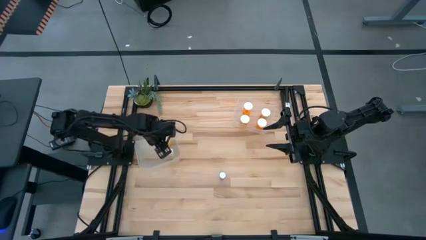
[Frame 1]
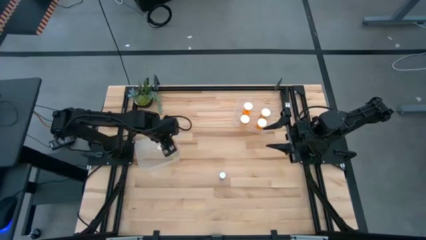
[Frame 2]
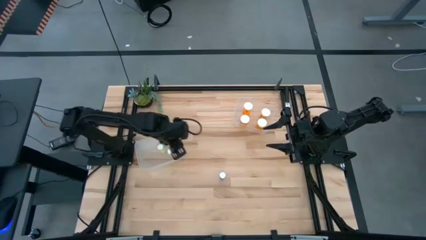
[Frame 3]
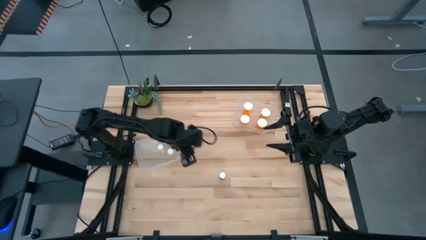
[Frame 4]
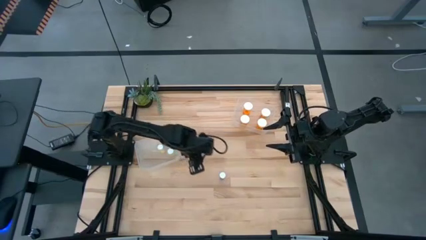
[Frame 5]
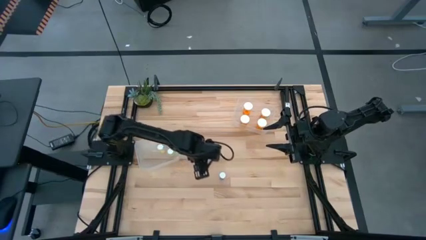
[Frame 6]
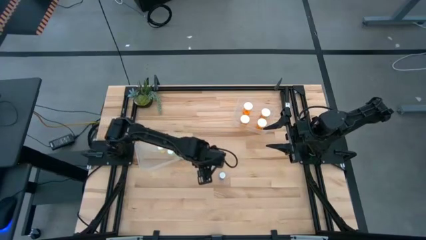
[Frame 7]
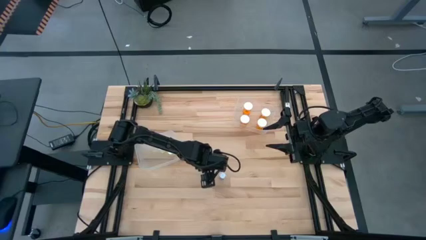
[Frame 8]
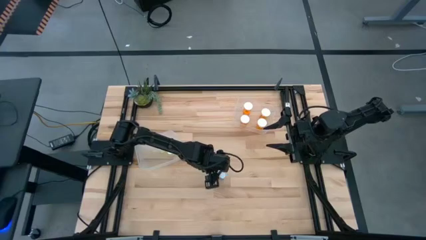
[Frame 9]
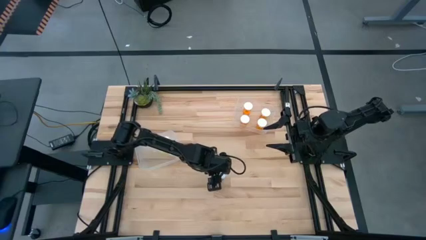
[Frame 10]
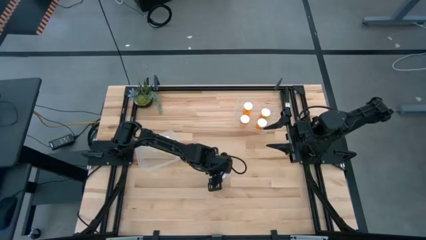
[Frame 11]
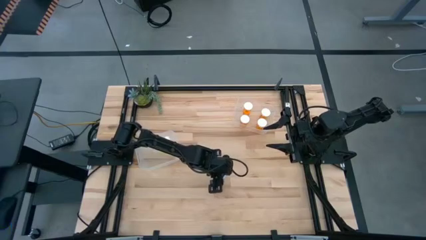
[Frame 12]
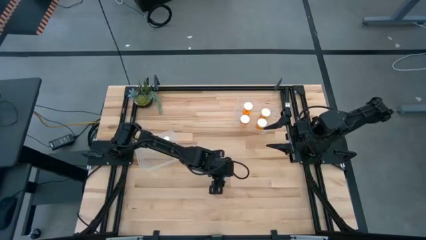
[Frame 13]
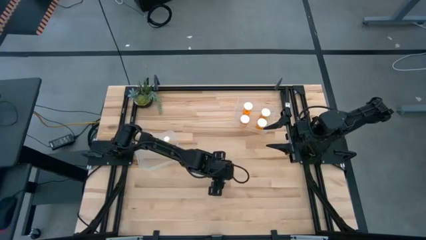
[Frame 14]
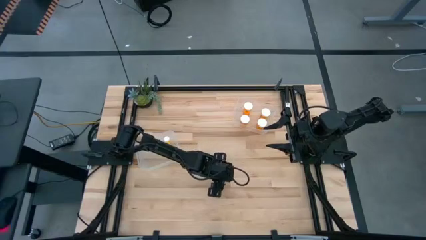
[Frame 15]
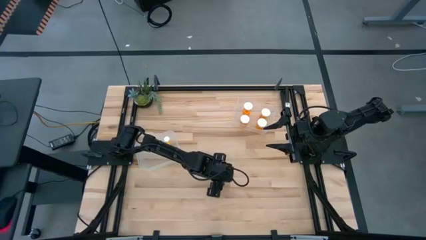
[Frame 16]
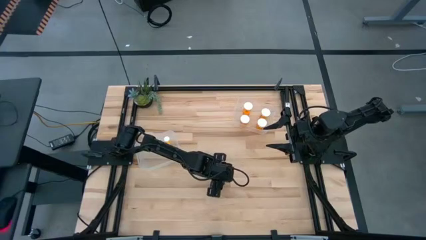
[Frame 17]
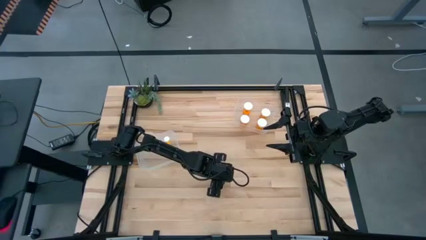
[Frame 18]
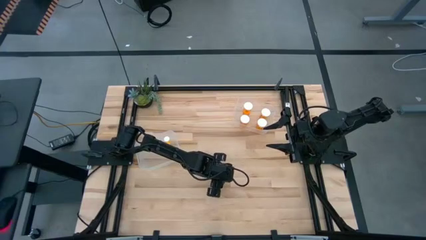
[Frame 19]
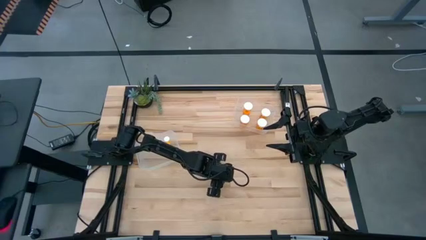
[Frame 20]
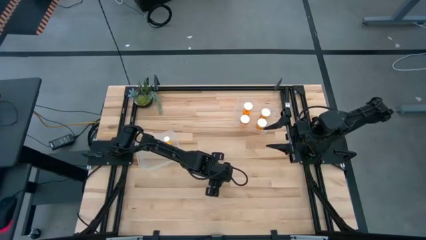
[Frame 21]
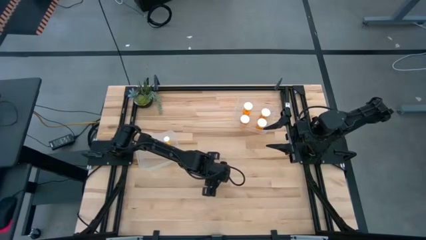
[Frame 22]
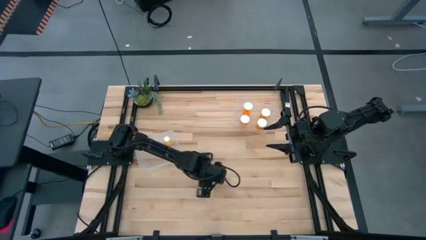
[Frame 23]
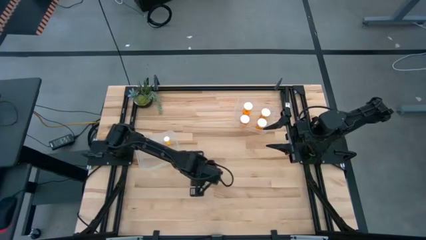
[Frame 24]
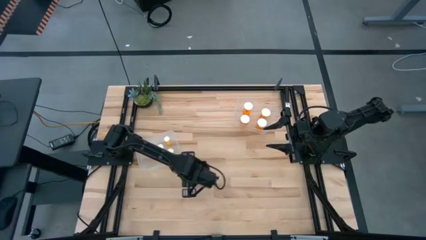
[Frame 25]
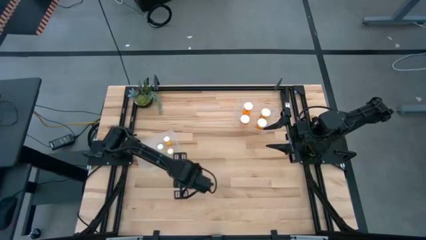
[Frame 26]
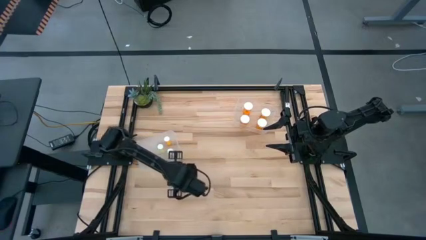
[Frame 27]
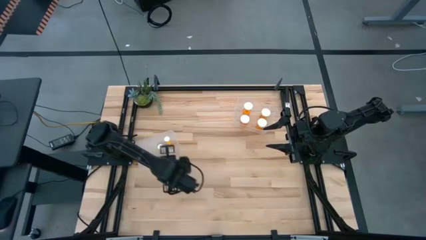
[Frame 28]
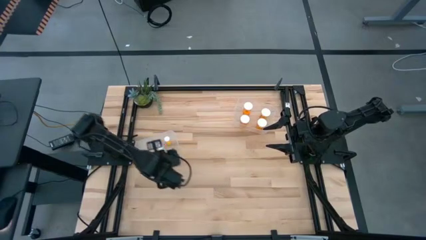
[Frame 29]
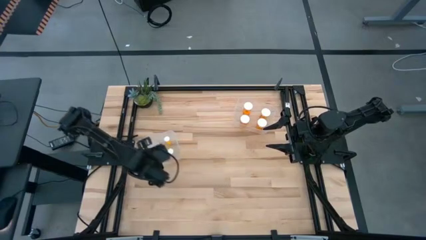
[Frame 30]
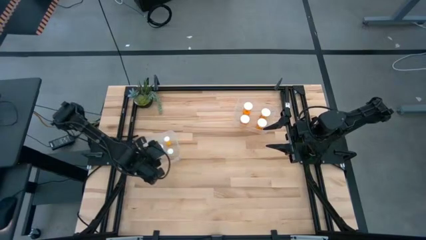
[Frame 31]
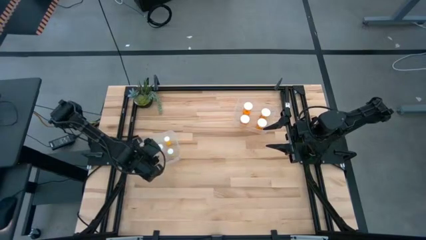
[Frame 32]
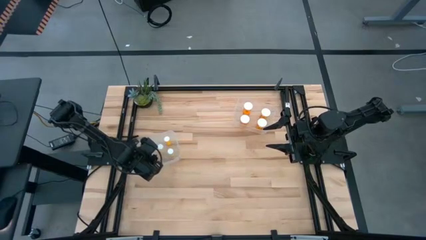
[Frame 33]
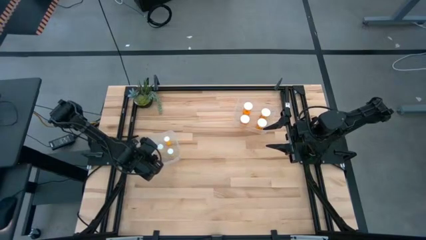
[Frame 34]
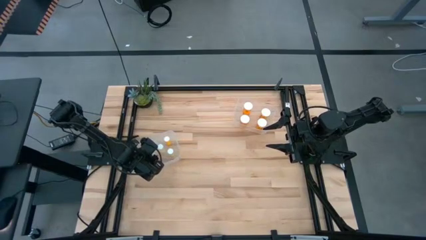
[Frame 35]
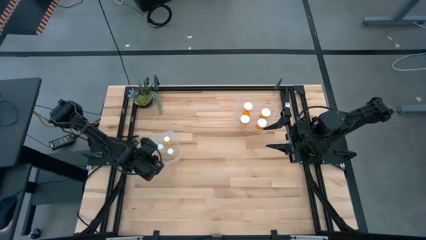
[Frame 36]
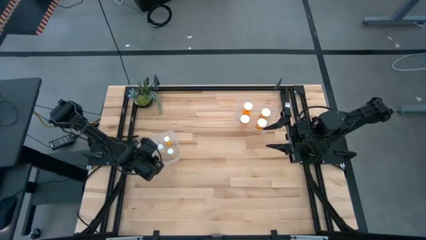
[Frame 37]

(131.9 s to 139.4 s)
Task: Pick and place medicine bottles into bin by pill shape (circle, oval)
Put the blue pill bottle into the left transparent bin

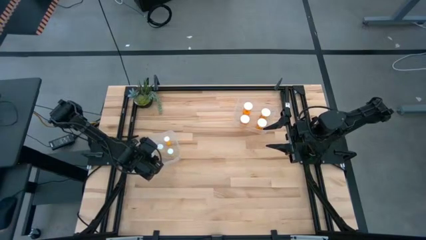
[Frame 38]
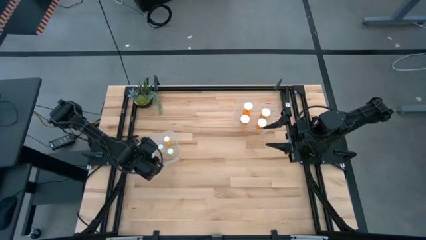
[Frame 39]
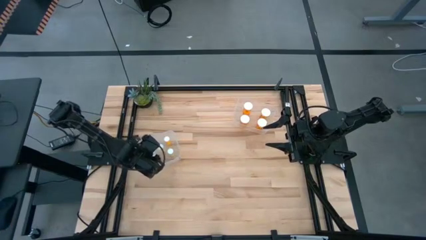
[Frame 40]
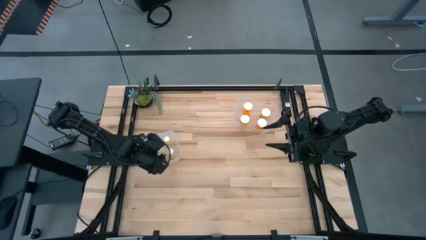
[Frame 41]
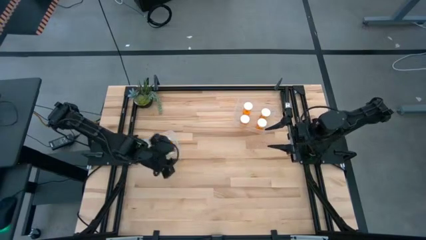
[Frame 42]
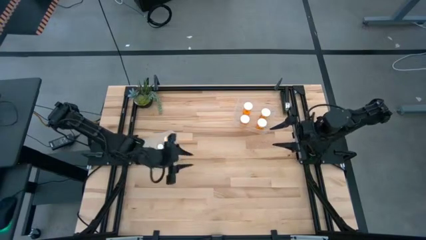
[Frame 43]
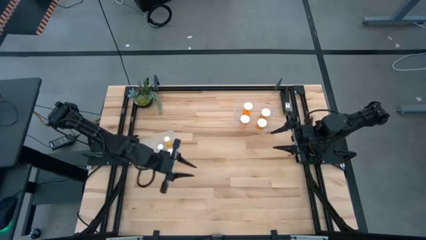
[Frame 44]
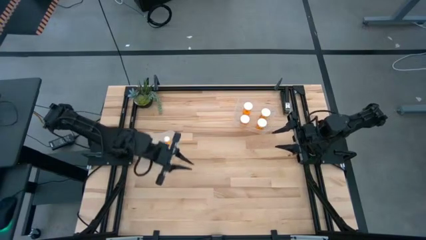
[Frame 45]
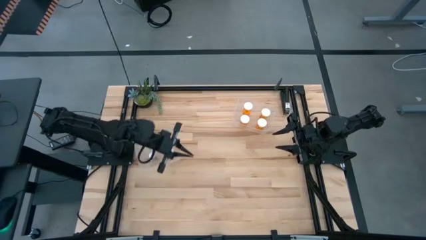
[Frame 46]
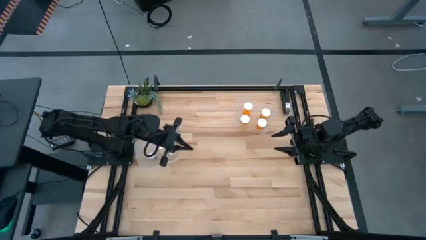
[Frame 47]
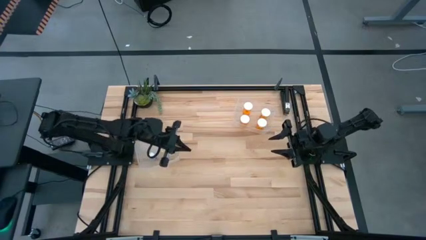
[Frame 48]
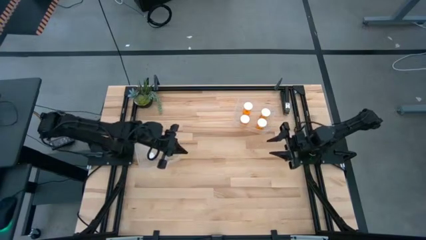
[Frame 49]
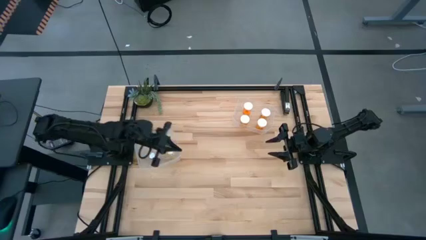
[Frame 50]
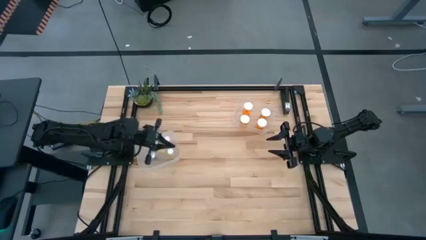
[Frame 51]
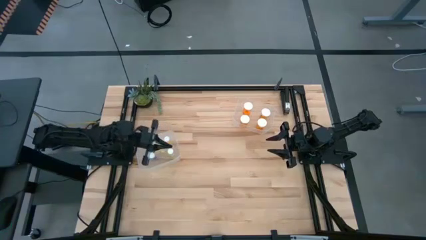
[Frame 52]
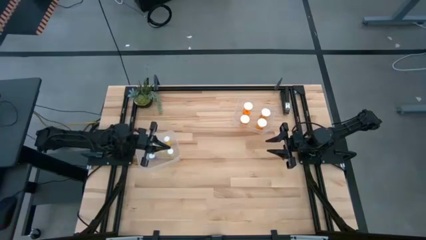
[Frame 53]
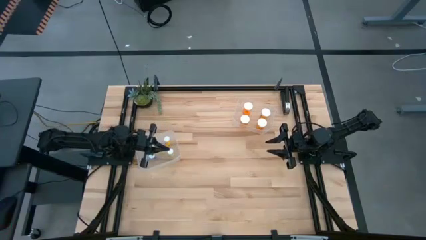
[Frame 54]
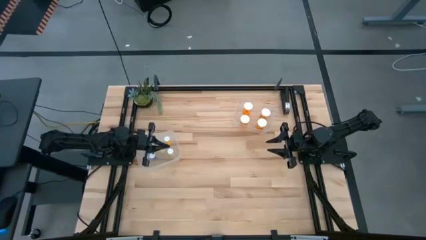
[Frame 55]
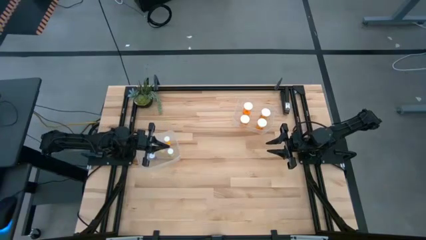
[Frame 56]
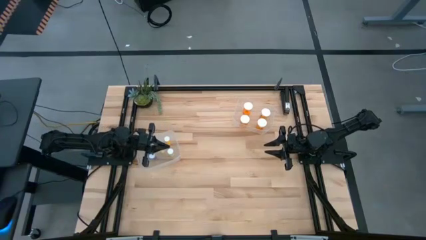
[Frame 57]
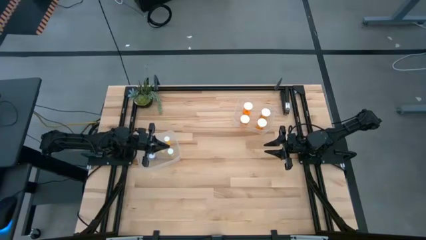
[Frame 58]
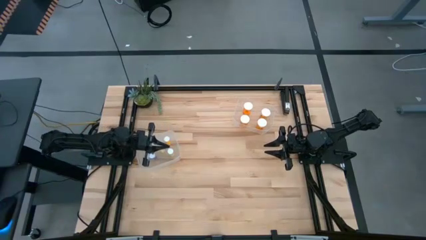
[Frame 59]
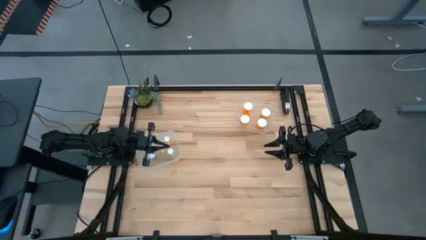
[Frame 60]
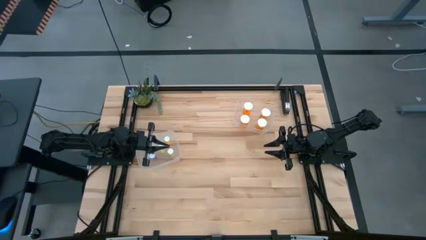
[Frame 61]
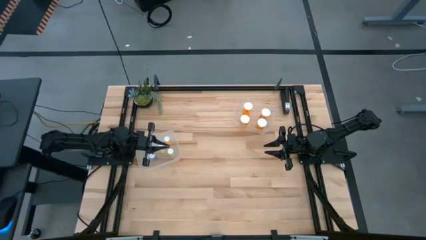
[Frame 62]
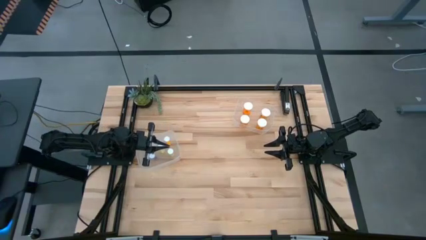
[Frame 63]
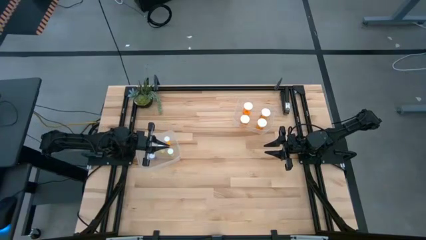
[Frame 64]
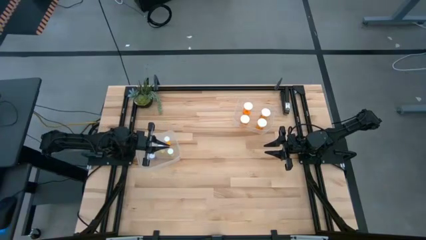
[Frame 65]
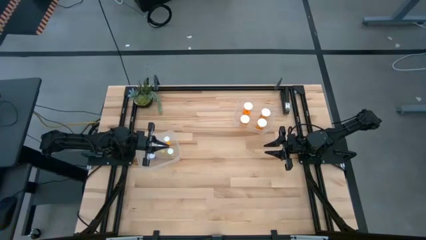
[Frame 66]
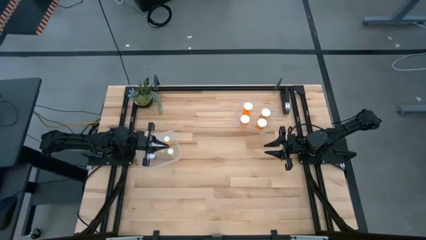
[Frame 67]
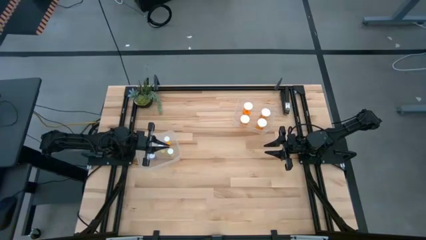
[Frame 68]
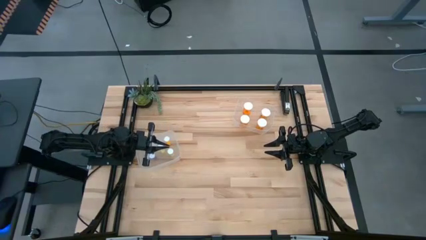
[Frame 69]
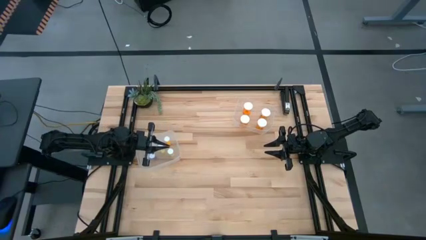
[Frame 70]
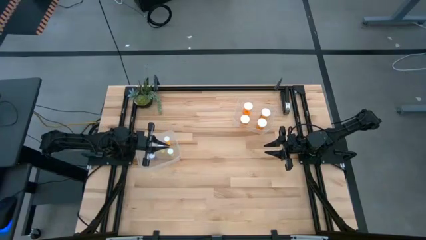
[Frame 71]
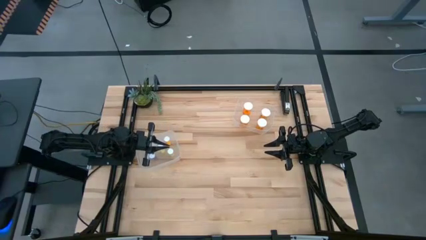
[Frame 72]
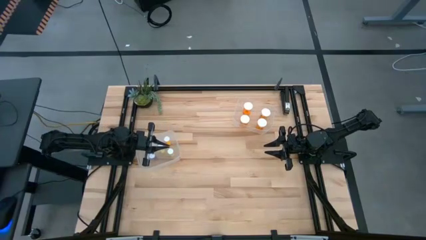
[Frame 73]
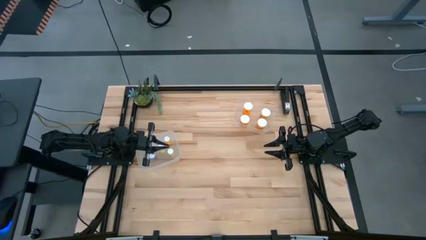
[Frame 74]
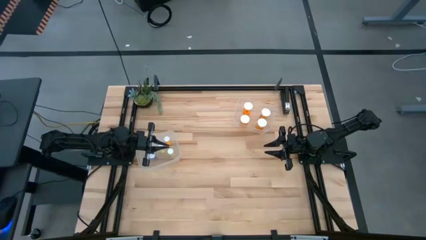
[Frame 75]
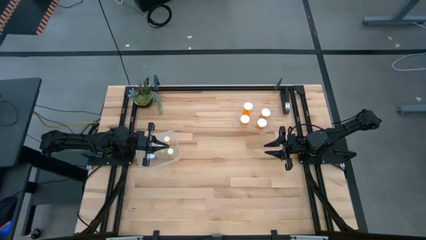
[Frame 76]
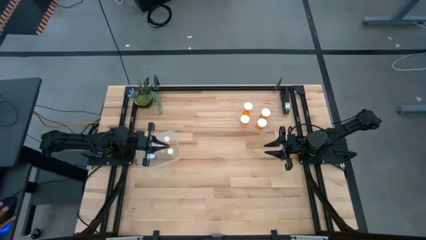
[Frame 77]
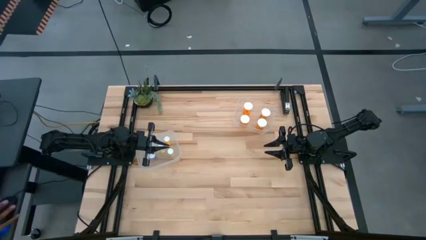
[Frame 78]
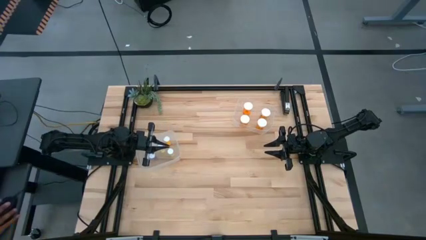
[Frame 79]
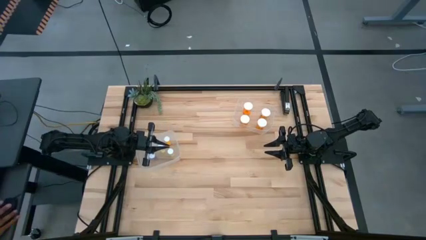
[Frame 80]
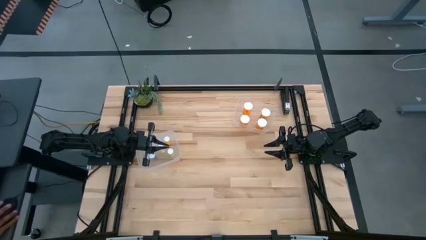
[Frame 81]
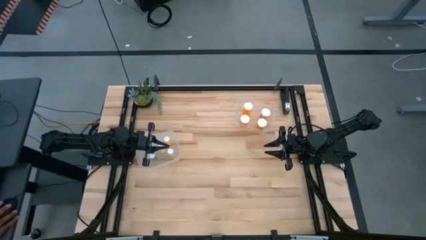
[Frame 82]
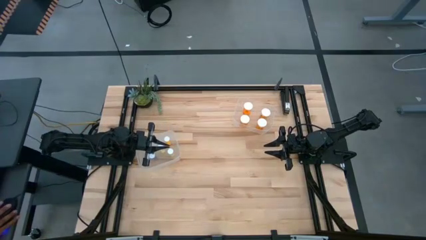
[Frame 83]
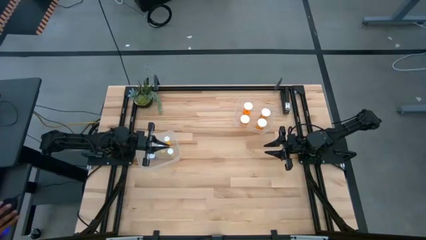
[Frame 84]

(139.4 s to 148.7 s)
Return to Home Position

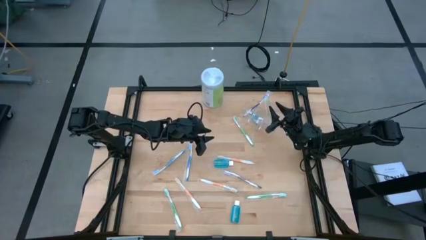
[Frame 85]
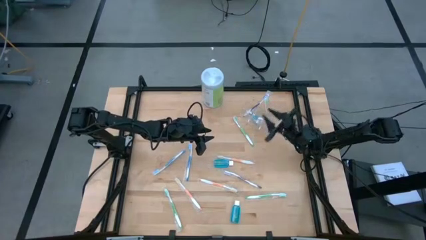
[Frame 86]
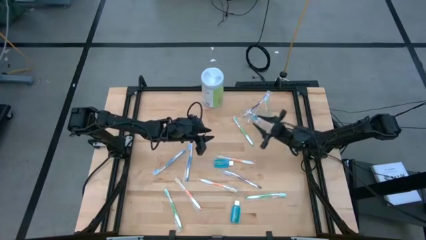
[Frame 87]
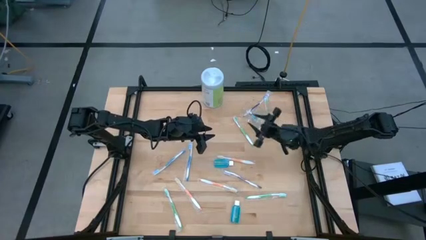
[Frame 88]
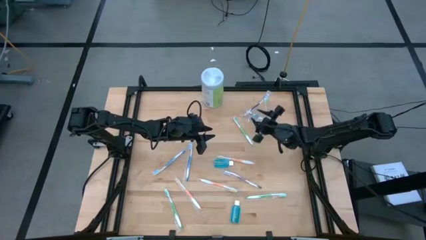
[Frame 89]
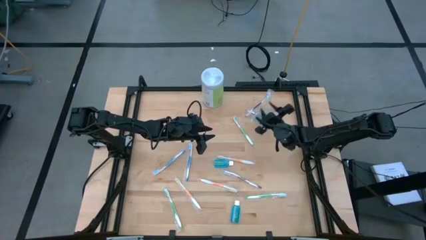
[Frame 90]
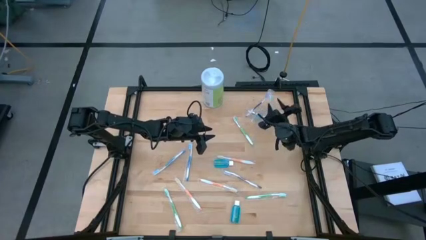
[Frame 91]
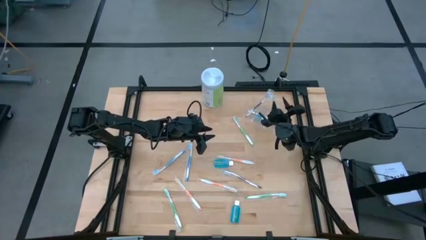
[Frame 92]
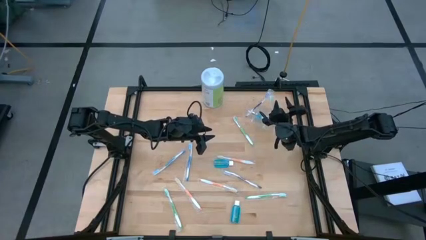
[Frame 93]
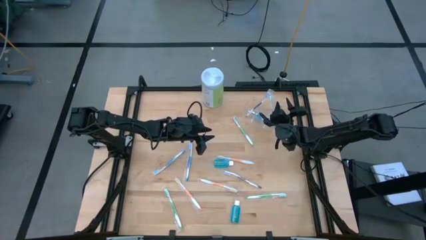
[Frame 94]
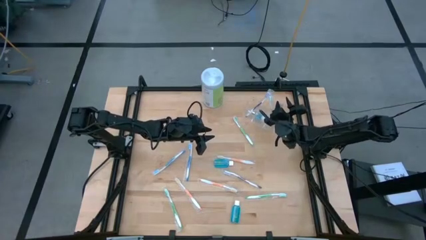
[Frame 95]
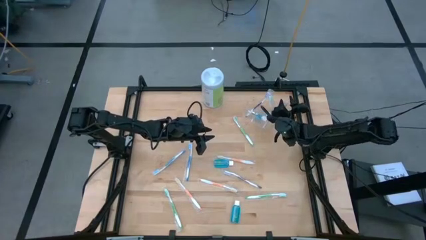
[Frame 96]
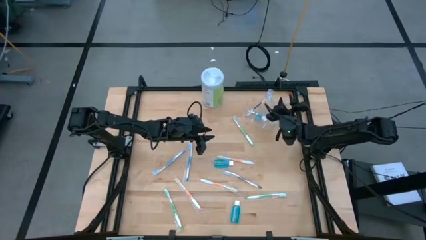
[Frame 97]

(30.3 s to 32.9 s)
Task: Pick & Place toothbrushing station
Adjust the orange toothbrush in the transparent organizer
